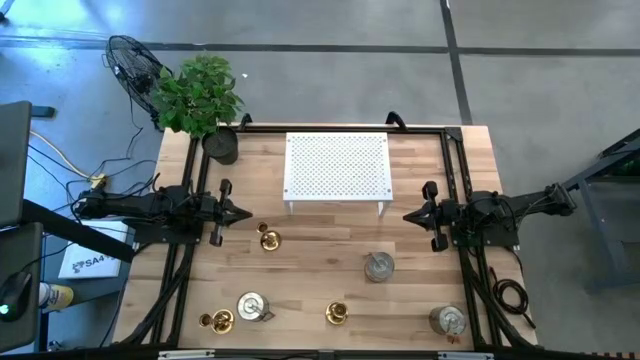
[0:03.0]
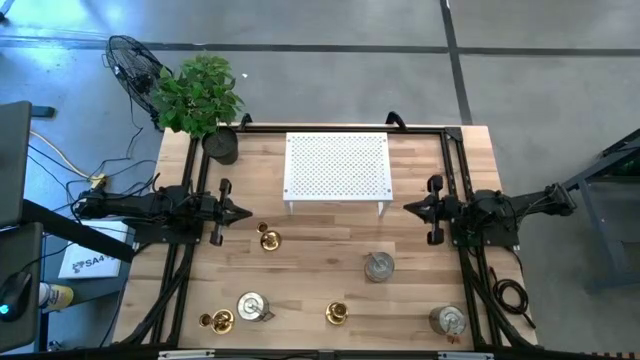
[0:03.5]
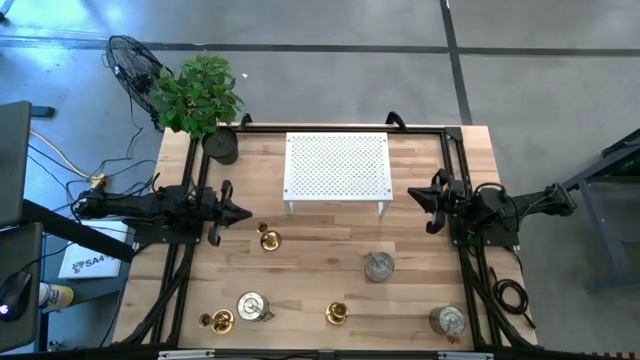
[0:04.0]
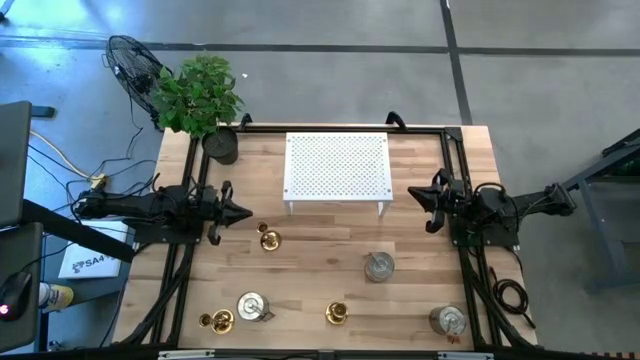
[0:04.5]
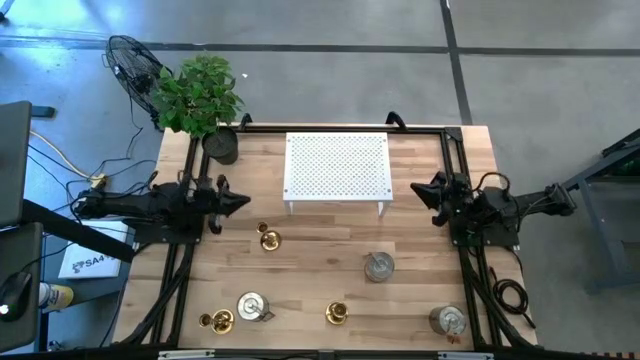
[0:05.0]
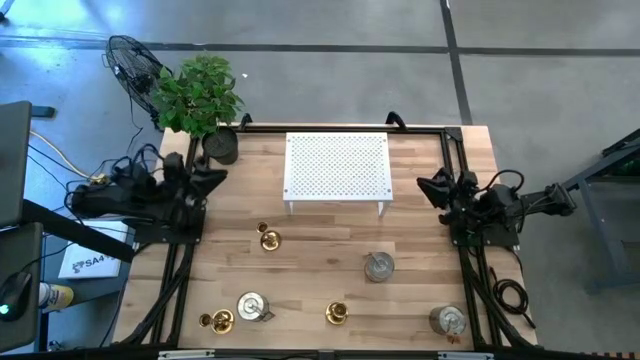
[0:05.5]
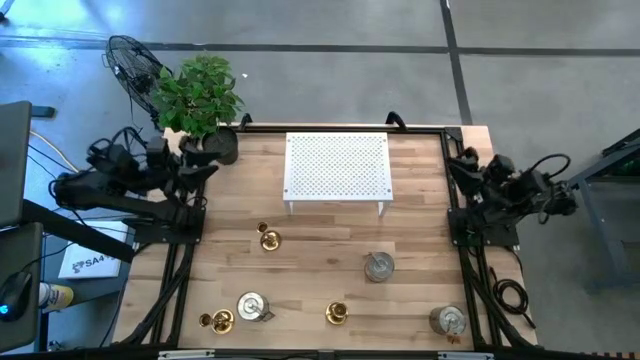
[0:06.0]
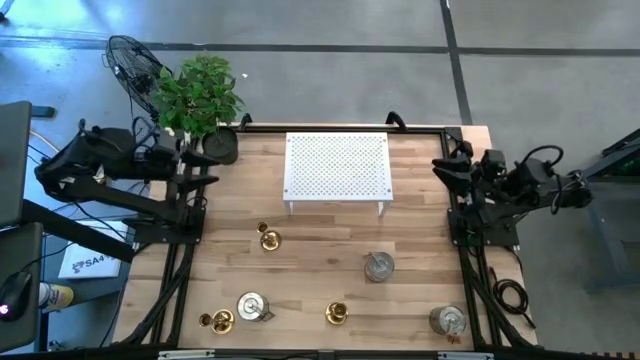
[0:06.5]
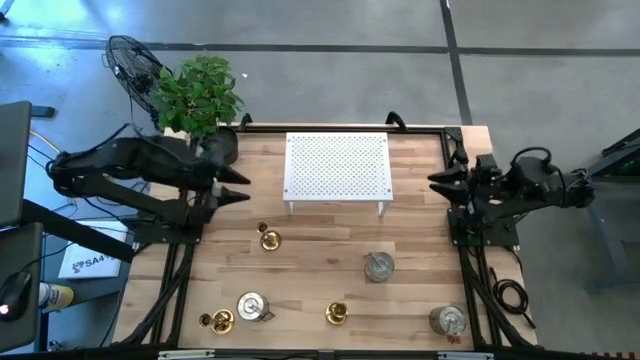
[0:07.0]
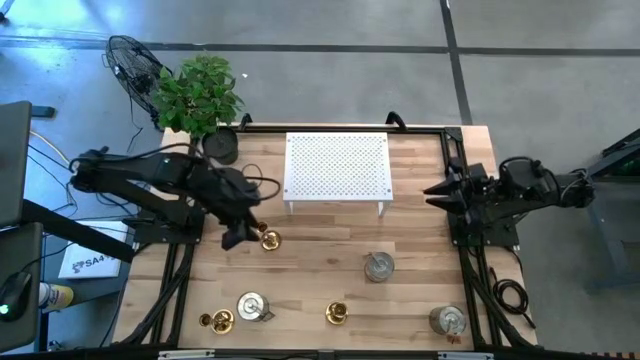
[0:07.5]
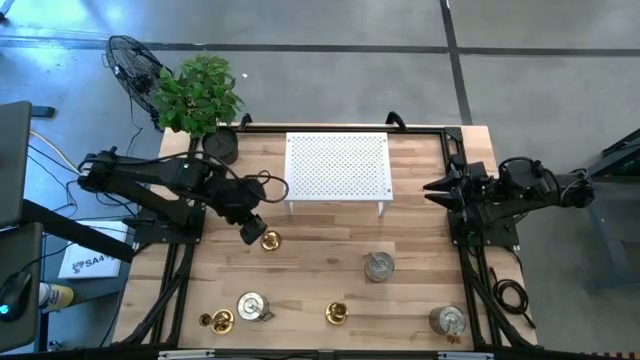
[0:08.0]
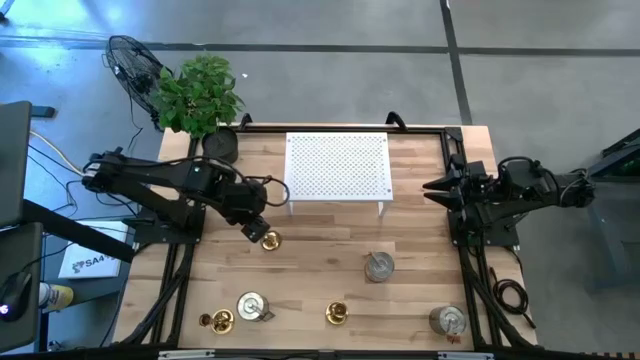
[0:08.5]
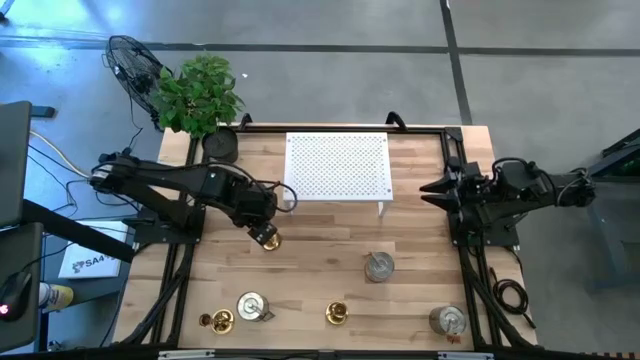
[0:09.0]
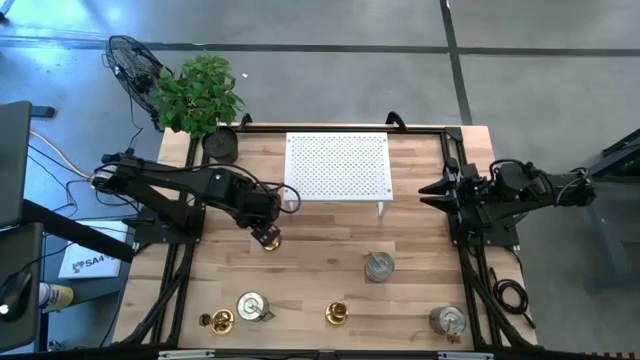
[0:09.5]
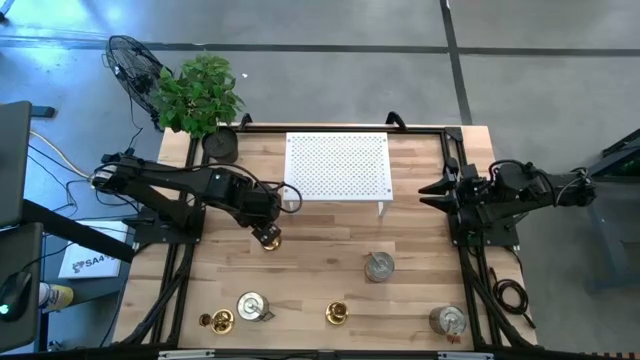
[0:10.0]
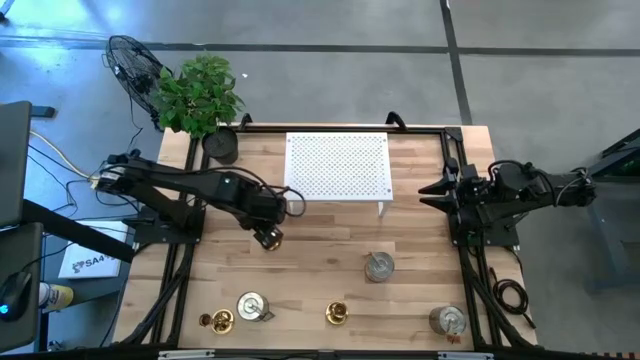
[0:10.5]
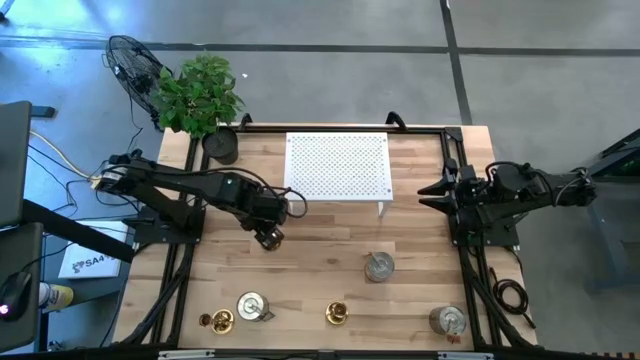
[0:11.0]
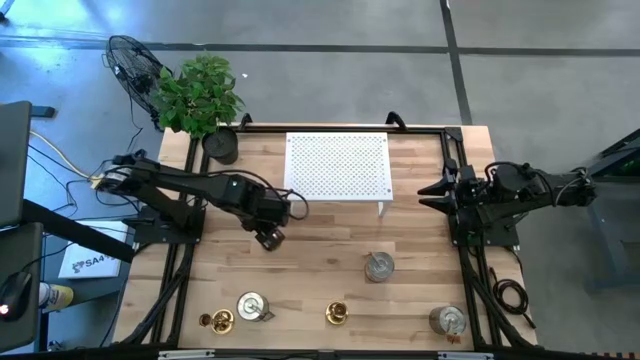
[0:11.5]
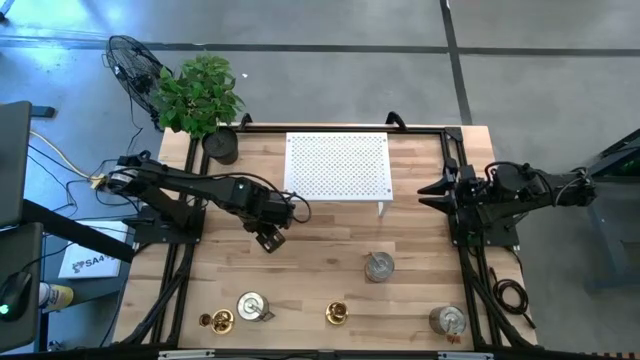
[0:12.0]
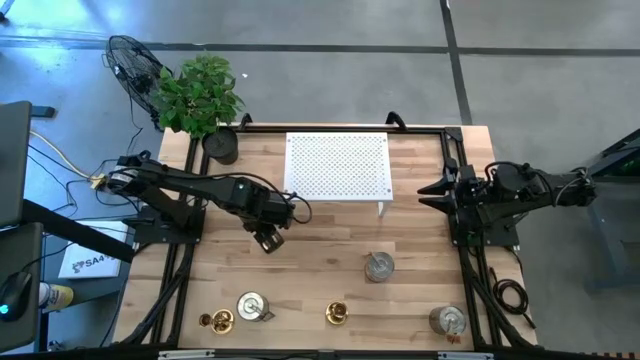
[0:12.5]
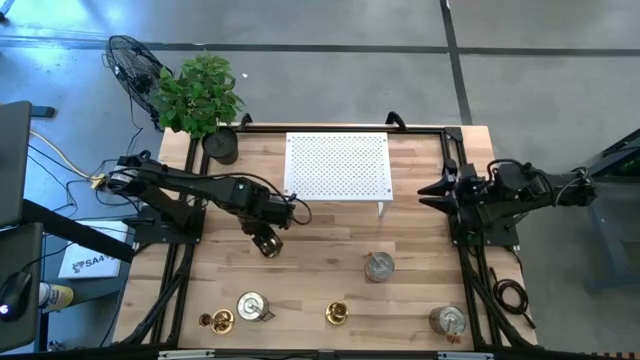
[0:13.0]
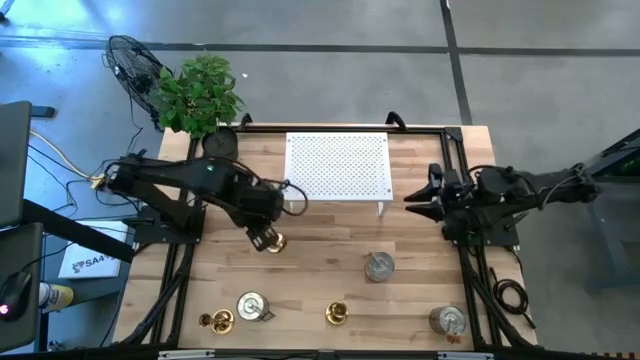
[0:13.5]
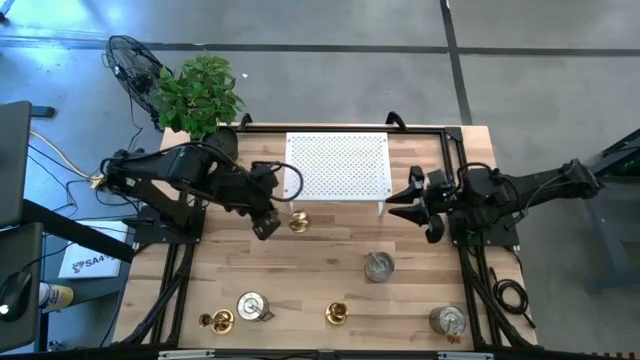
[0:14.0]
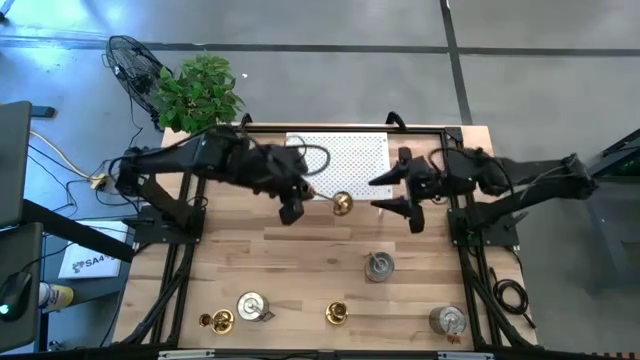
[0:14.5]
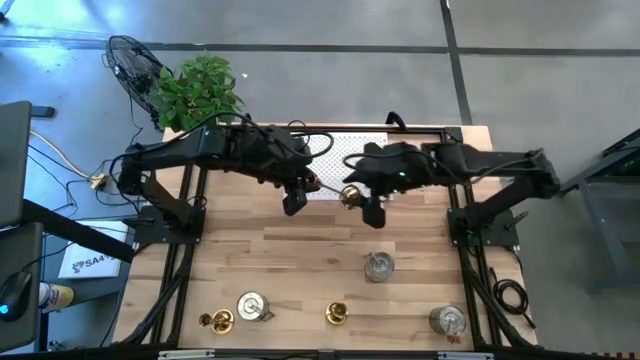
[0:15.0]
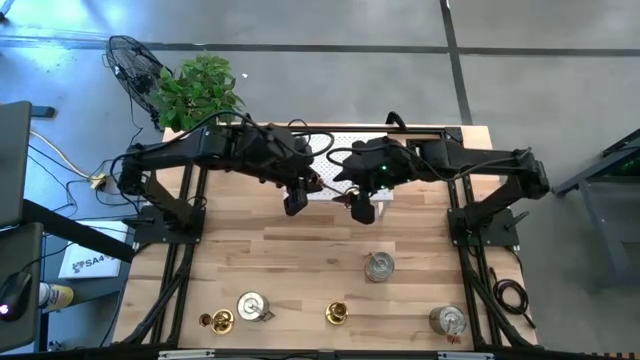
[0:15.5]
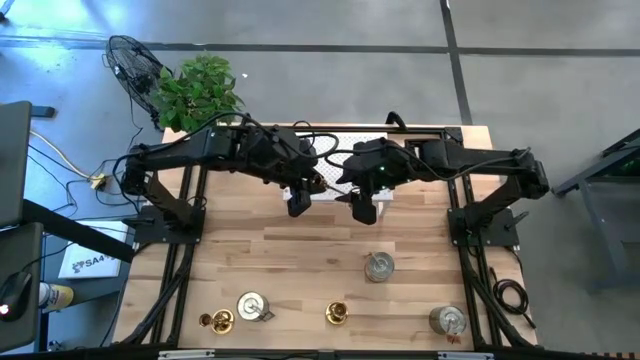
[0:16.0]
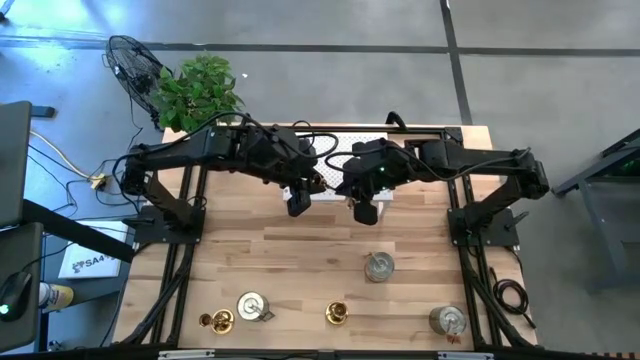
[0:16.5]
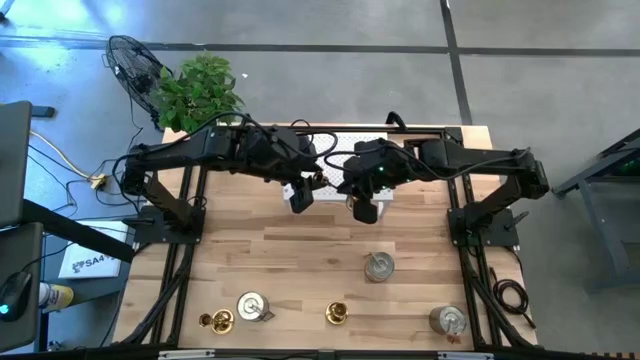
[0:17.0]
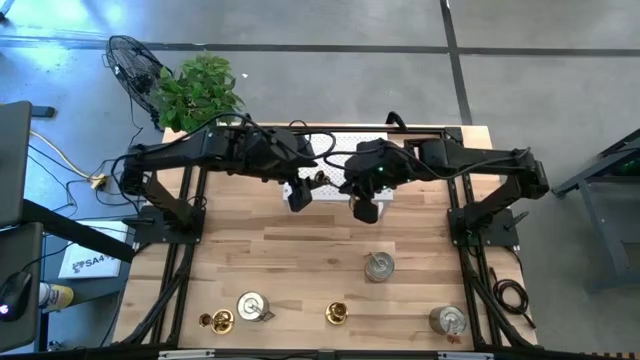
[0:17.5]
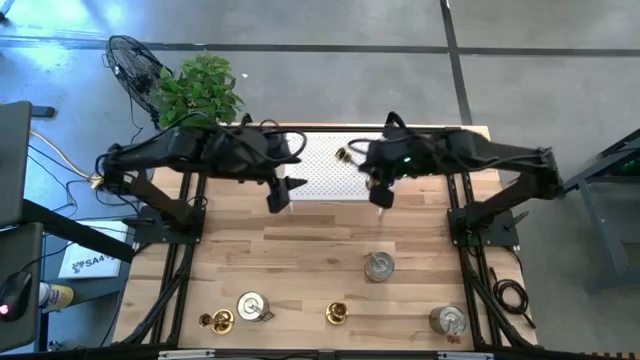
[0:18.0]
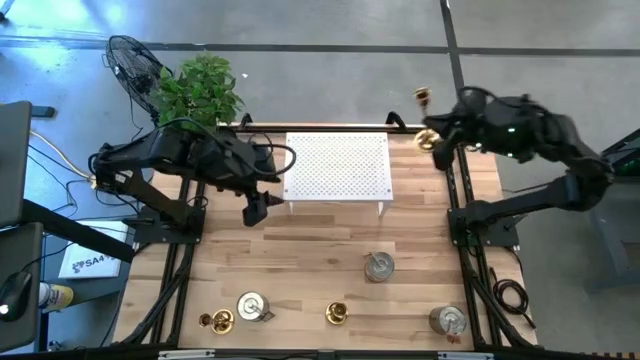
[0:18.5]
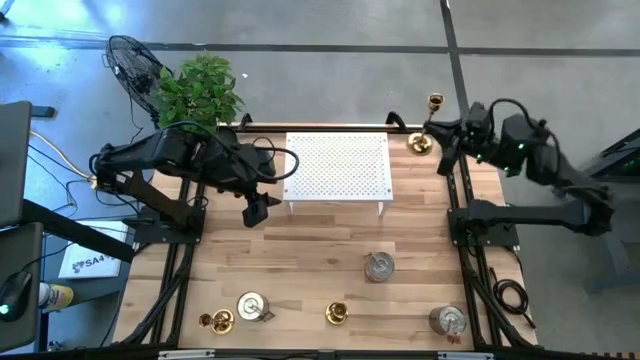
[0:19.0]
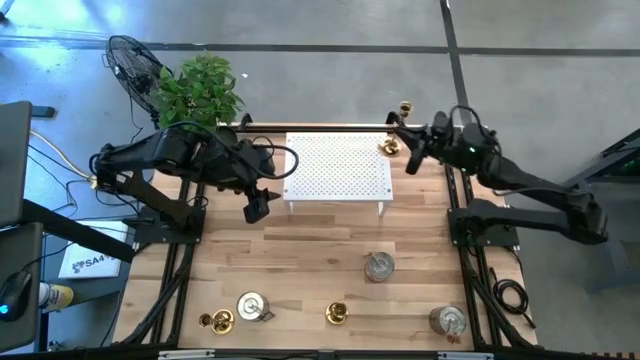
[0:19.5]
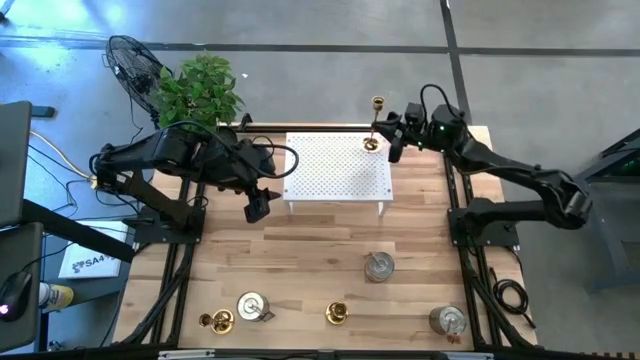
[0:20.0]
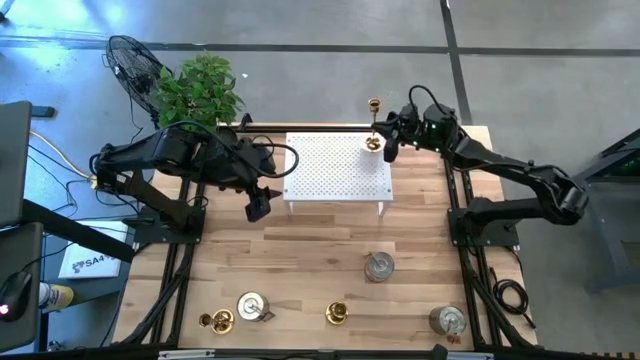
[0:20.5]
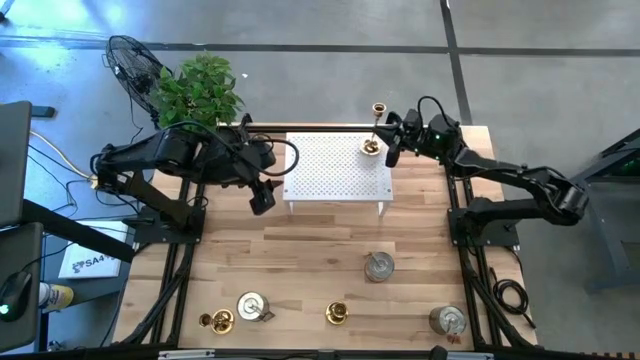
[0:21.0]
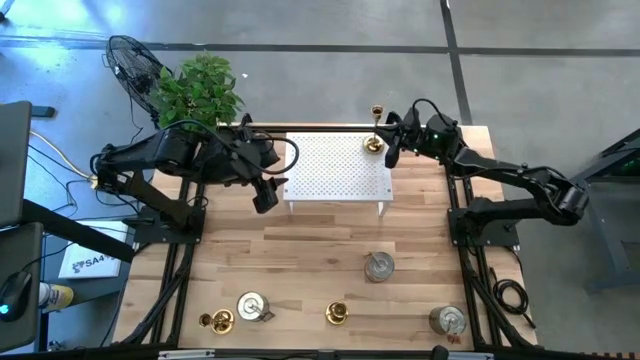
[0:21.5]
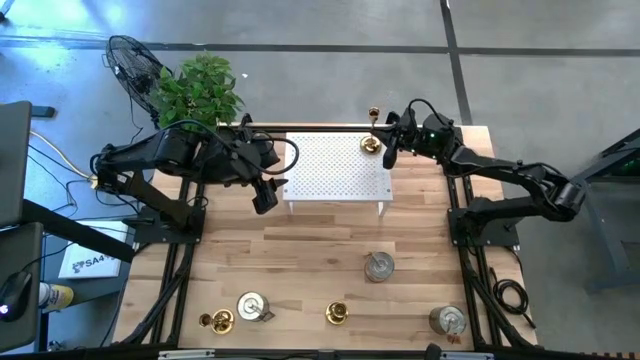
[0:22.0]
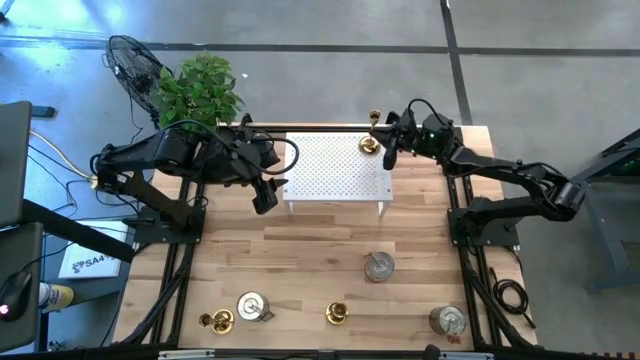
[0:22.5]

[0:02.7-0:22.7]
Task: Pick & Place candle stick holders
Put the top gold candle holder on the shelf

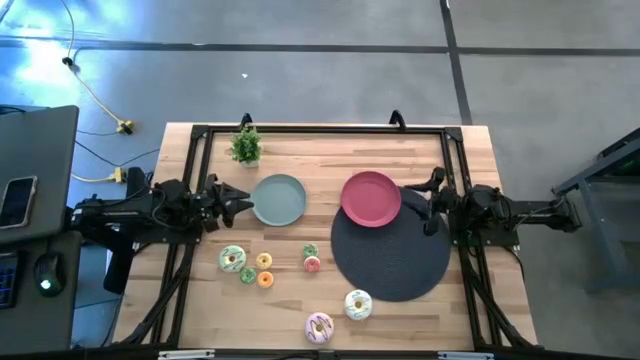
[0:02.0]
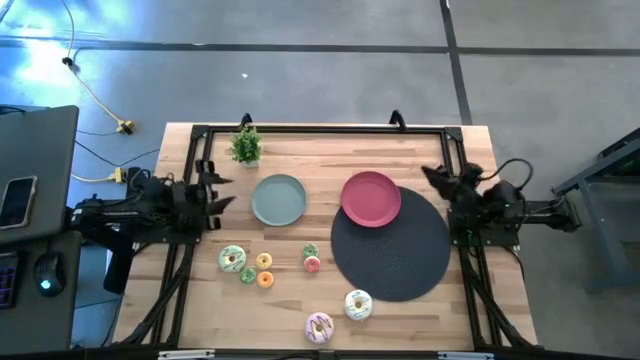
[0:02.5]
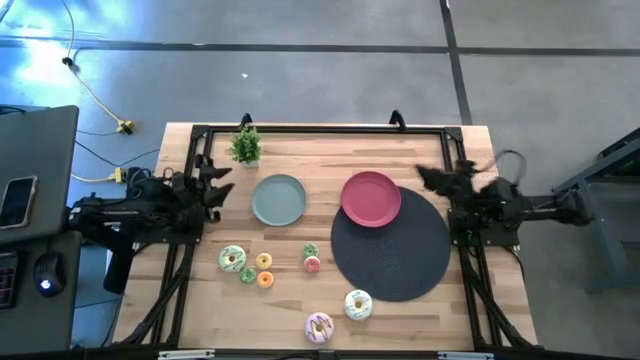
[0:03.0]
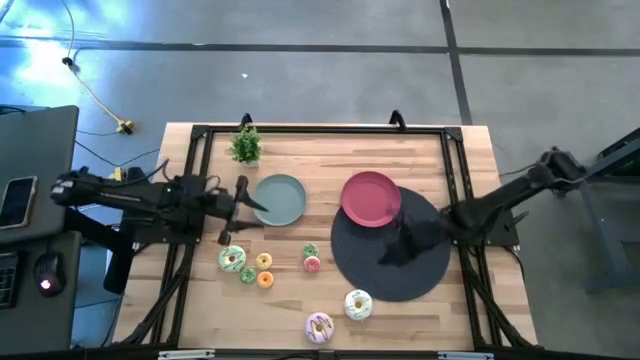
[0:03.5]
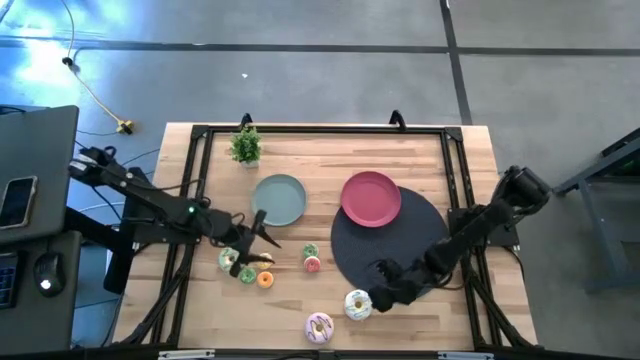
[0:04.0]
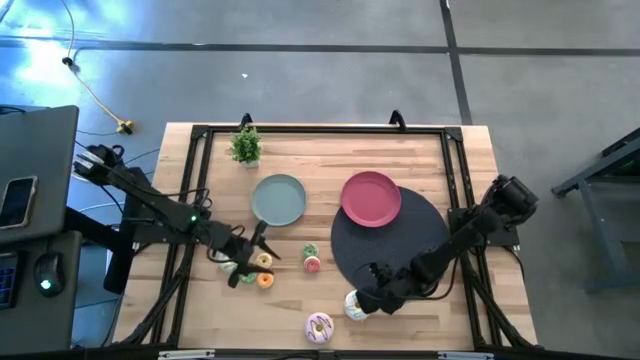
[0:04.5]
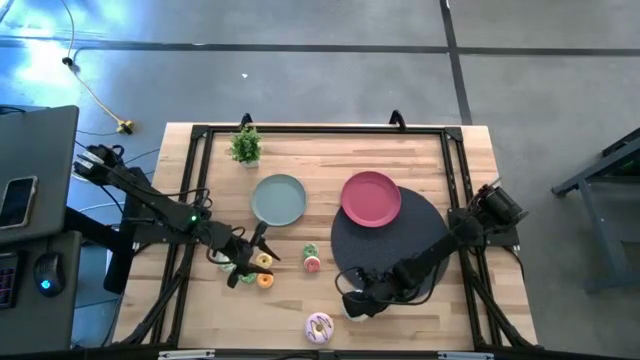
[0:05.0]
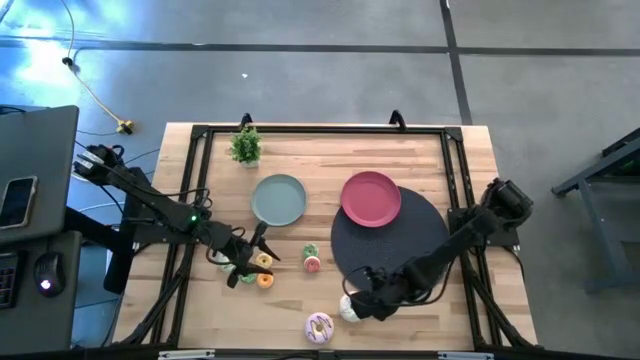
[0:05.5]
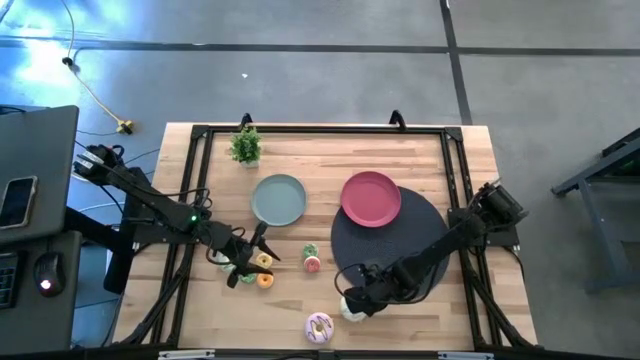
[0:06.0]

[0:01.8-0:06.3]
Task: Pick & Place donuts
Put the large white donut on the red plate
